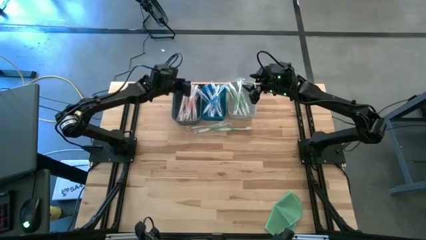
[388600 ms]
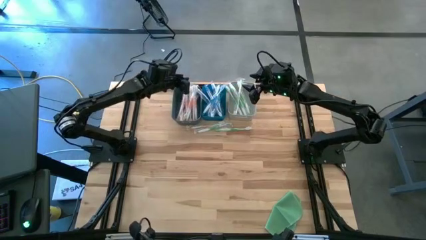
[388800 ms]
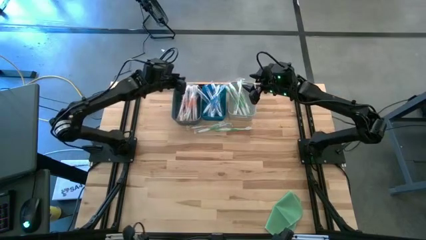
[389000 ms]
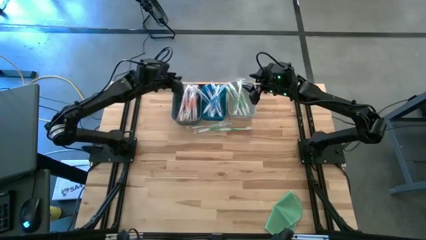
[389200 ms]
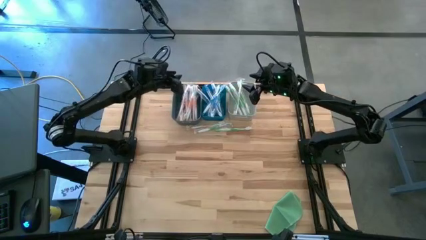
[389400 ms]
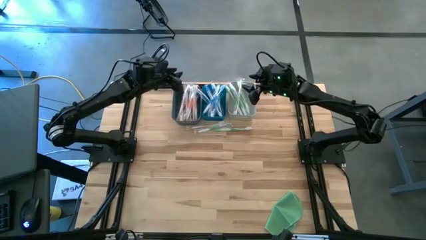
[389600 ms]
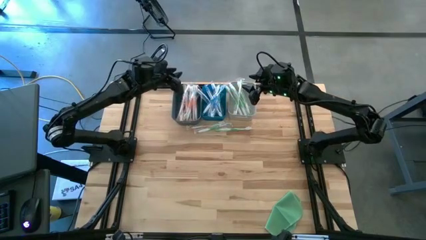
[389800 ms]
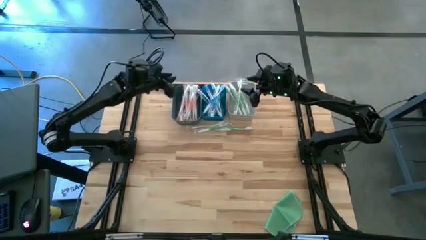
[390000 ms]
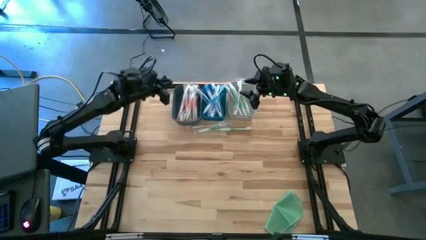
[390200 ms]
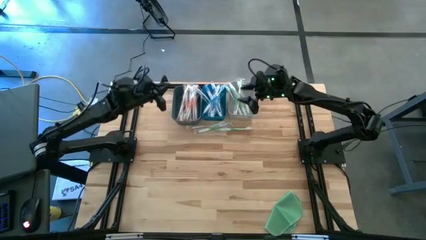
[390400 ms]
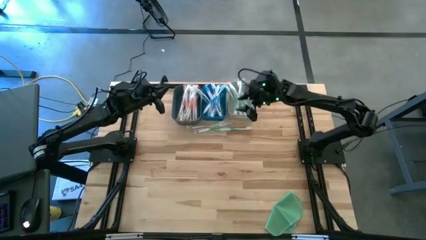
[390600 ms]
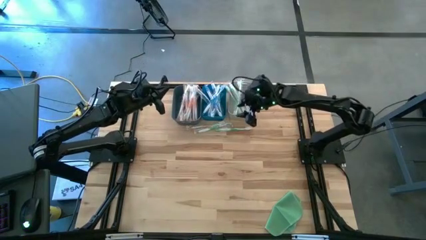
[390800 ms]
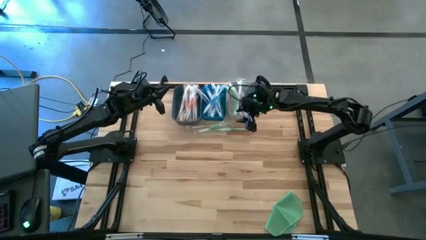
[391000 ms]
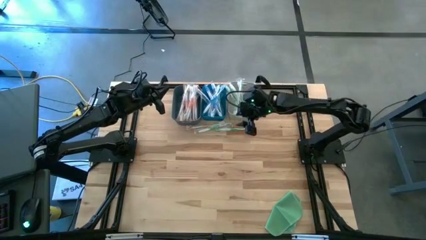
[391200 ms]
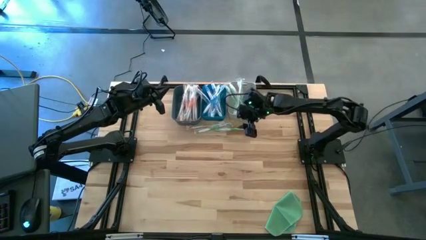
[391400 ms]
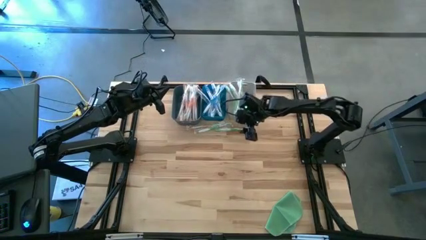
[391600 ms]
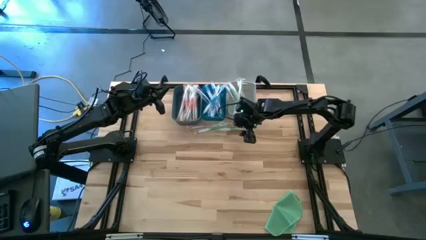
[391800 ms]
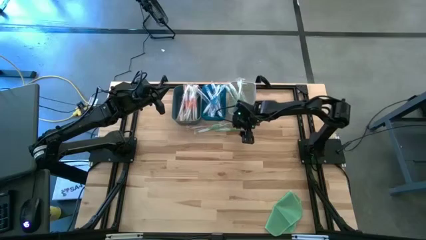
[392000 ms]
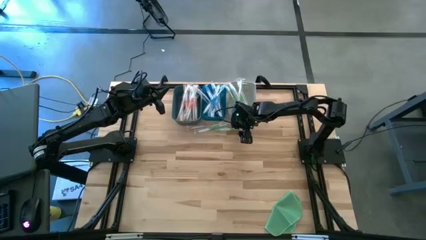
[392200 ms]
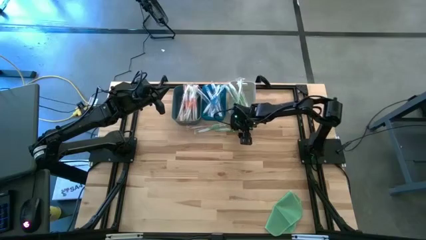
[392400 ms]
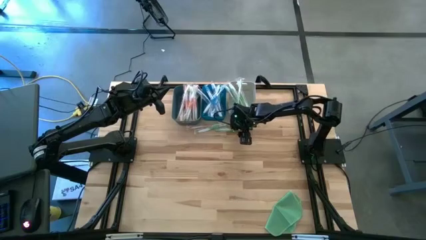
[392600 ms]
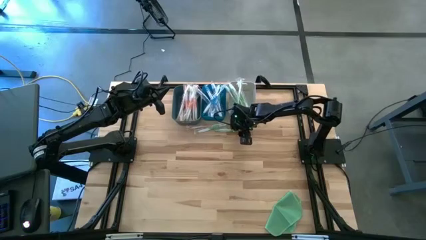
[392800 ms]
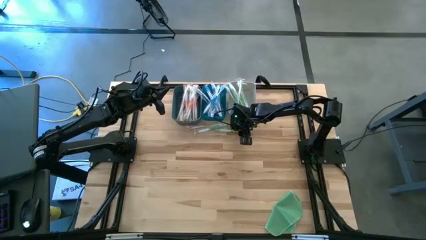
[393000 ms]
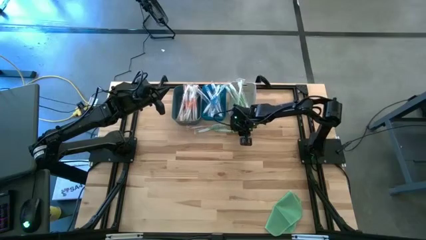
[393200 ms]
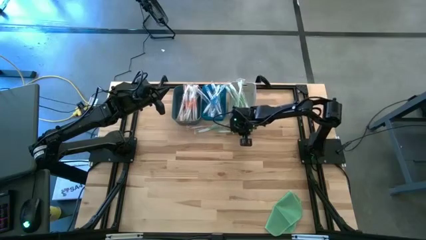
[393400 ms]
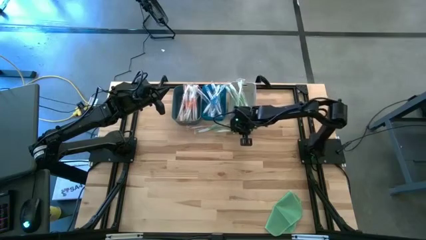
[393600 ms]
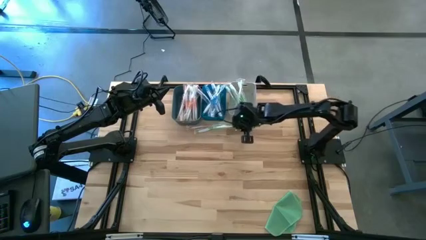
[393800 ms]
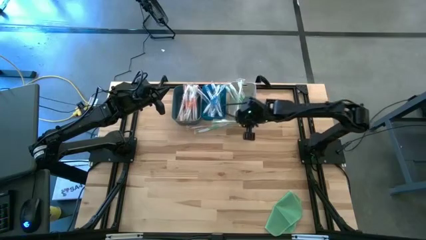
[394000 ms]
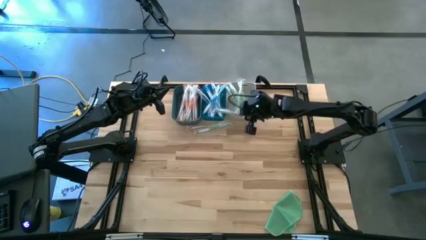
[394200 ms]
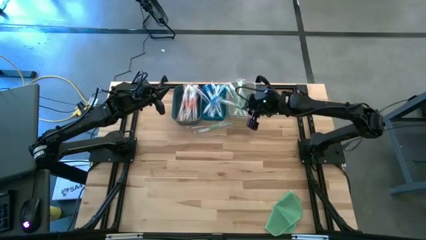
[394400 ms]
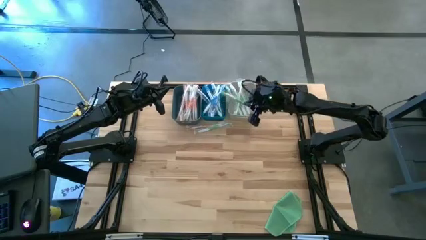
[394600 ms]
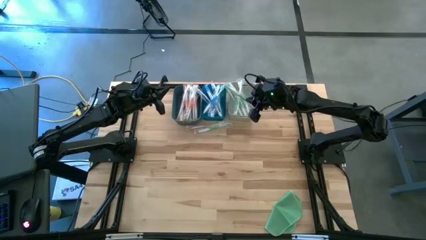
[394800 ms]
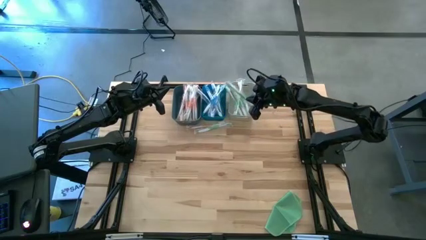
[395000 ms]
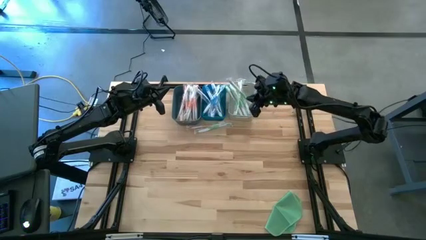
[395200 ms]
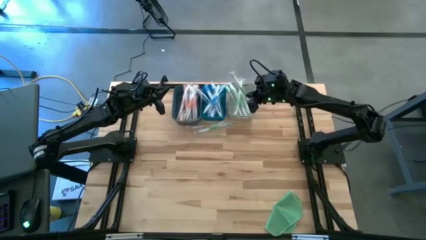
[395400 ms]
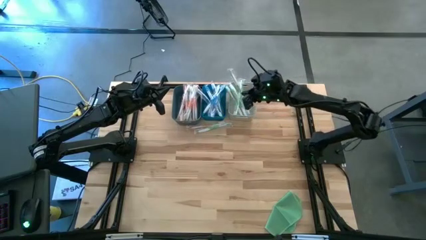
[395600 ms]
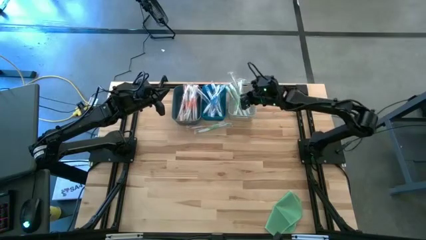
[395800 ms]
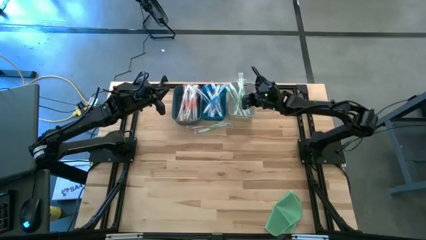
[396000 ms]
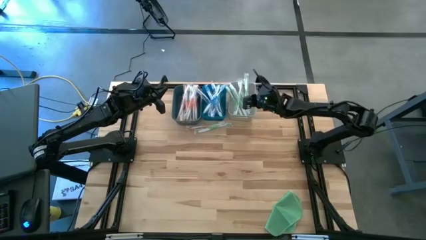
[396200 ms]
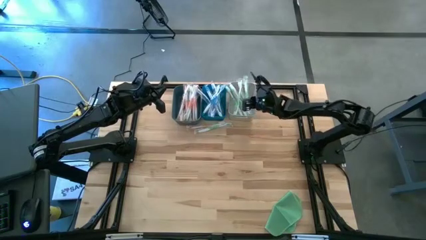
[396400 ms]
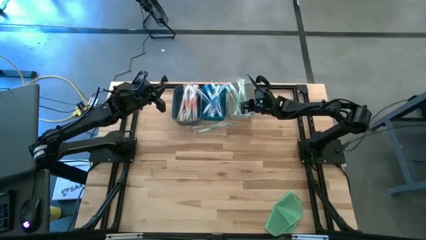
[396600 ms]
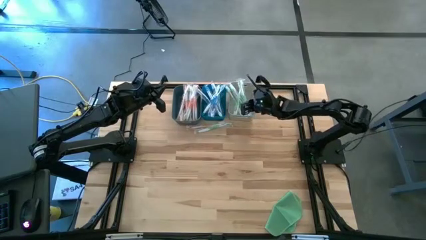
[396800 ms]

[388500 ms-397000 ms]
Task: Pick & Place Toothbrushes
Put the green toothbrush into the white bin

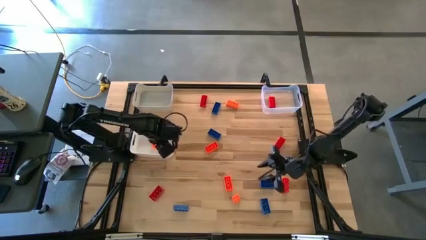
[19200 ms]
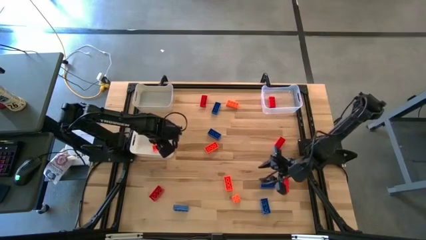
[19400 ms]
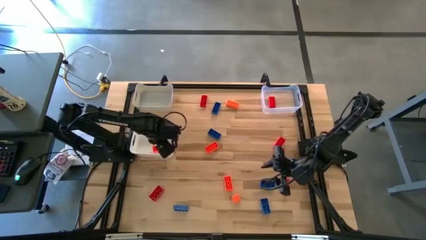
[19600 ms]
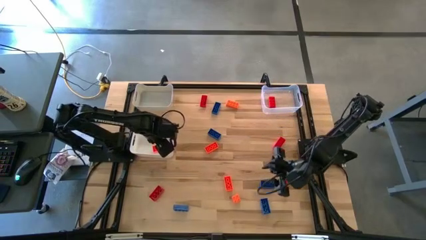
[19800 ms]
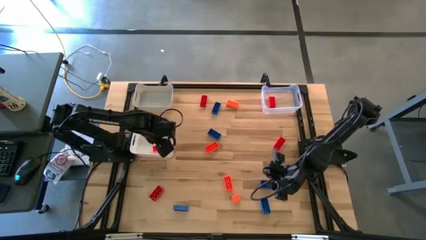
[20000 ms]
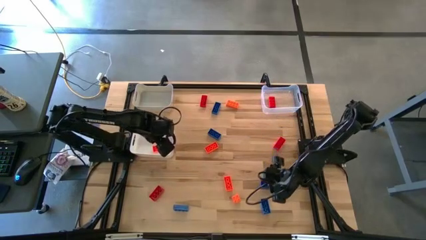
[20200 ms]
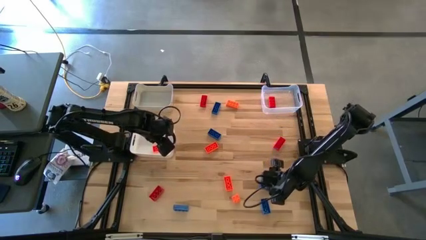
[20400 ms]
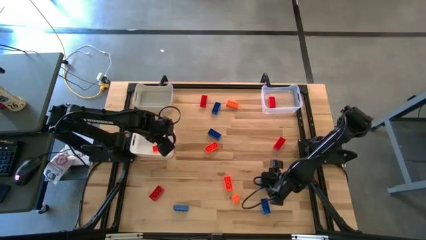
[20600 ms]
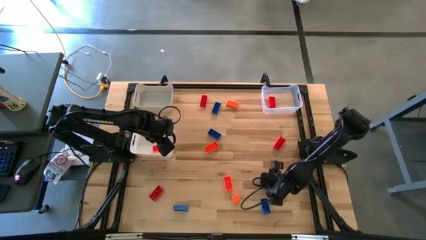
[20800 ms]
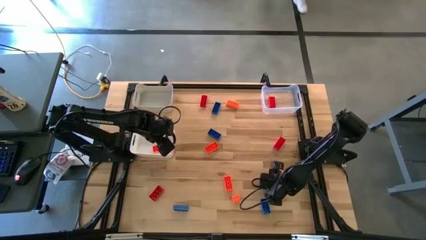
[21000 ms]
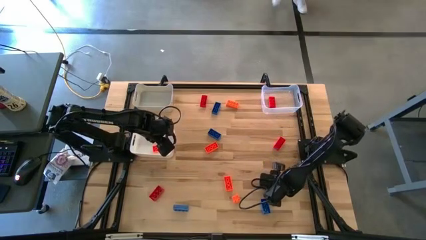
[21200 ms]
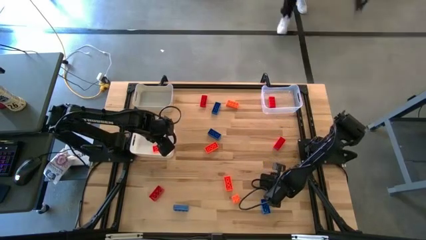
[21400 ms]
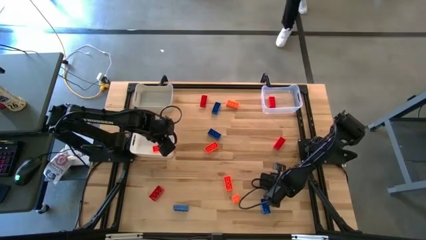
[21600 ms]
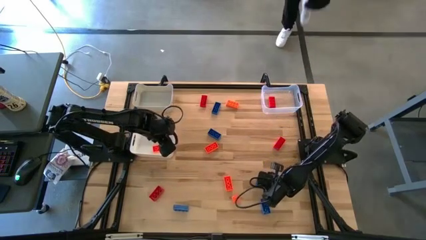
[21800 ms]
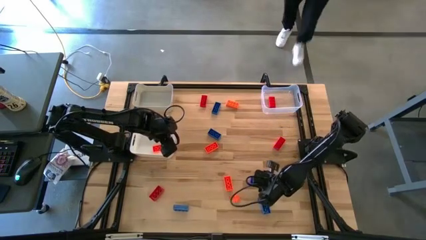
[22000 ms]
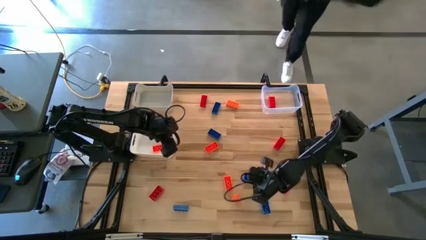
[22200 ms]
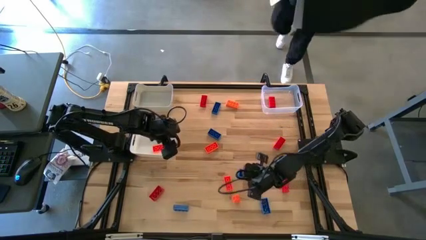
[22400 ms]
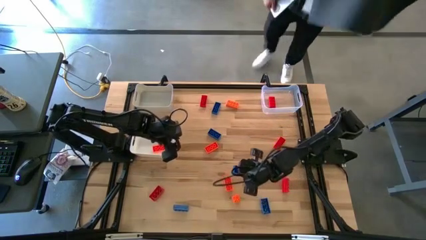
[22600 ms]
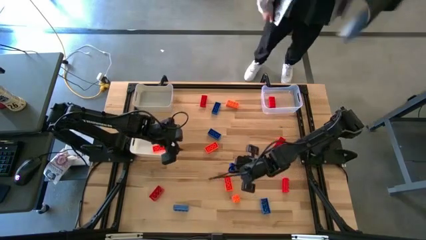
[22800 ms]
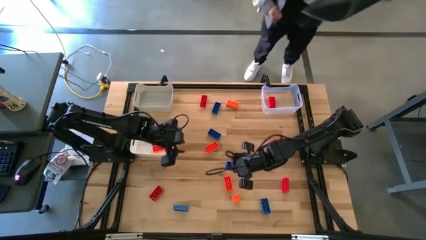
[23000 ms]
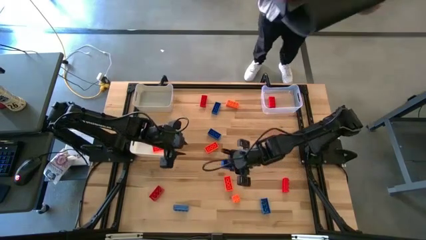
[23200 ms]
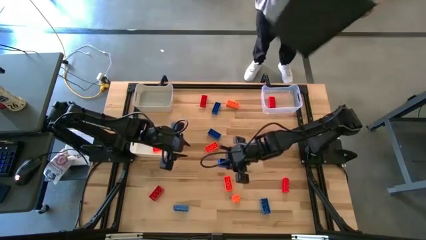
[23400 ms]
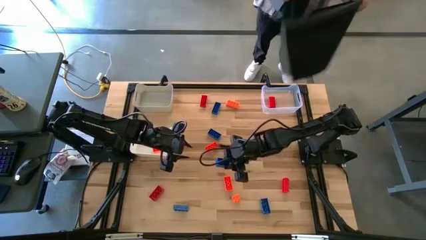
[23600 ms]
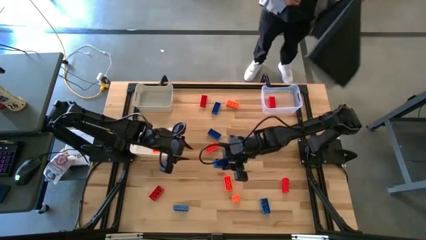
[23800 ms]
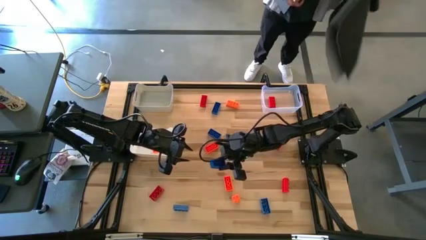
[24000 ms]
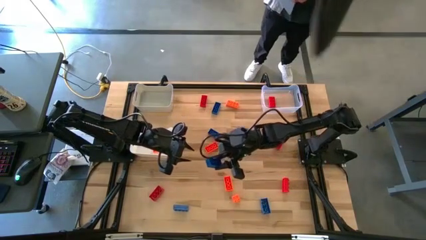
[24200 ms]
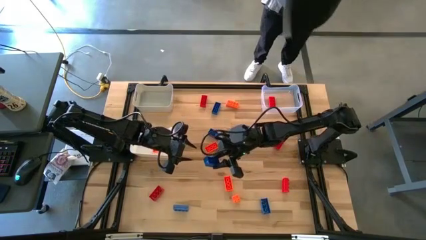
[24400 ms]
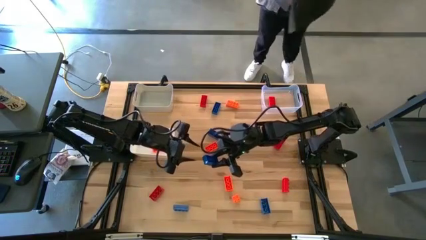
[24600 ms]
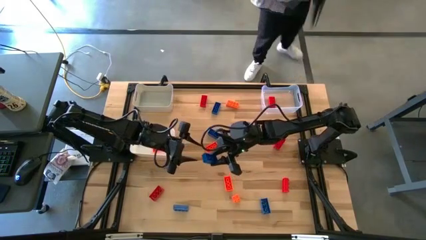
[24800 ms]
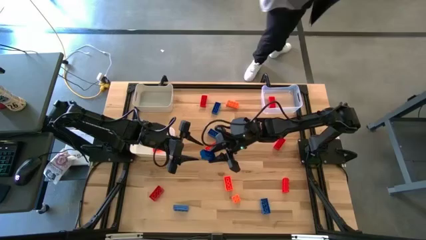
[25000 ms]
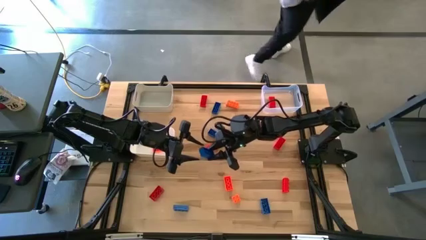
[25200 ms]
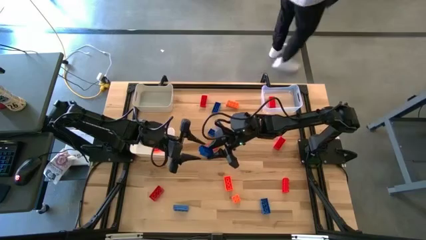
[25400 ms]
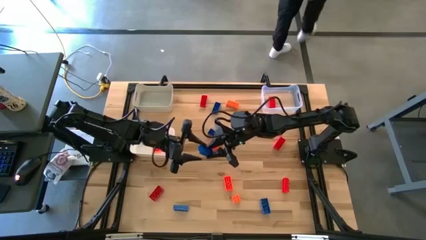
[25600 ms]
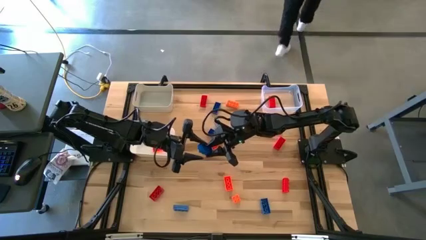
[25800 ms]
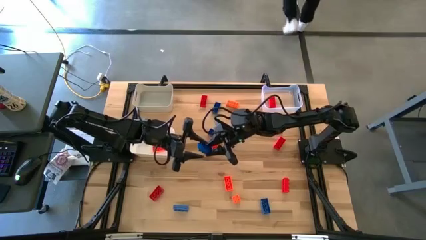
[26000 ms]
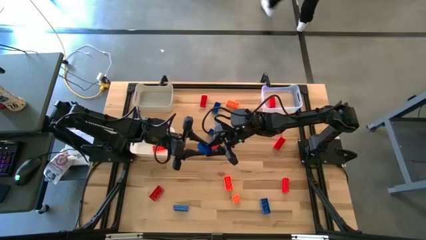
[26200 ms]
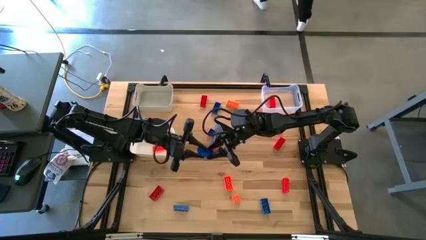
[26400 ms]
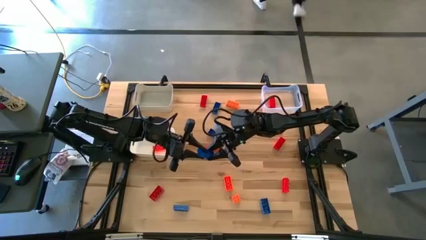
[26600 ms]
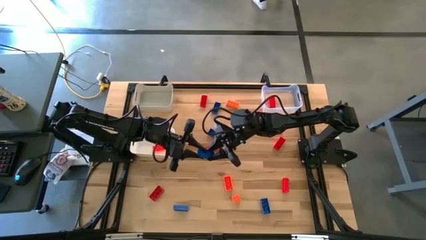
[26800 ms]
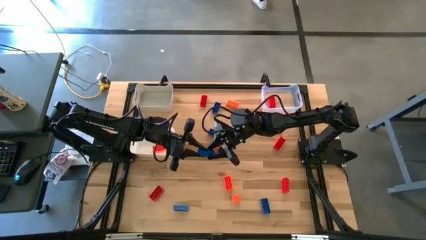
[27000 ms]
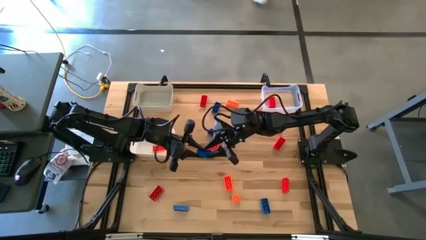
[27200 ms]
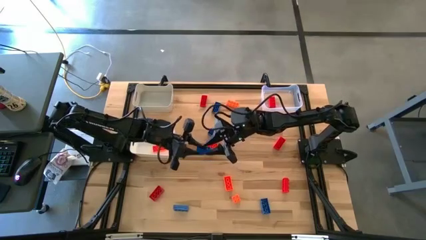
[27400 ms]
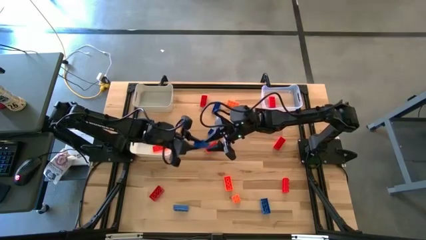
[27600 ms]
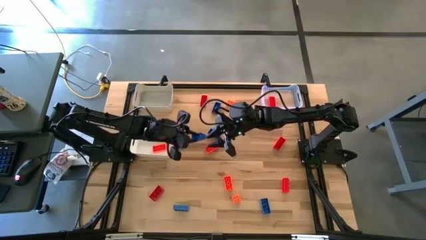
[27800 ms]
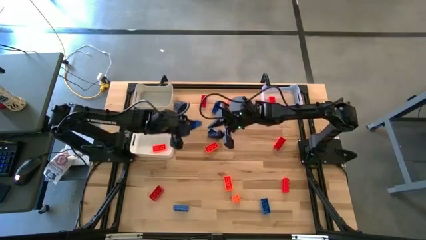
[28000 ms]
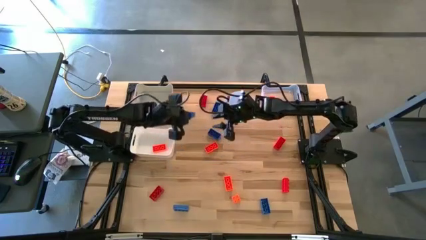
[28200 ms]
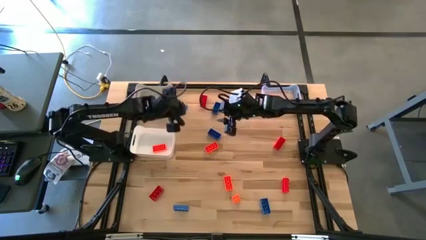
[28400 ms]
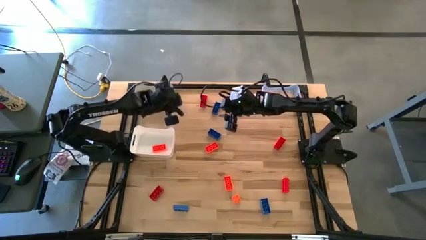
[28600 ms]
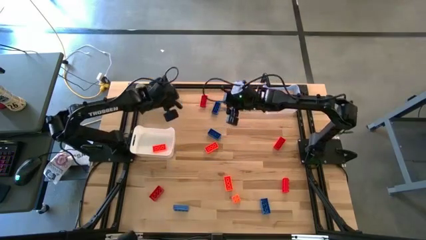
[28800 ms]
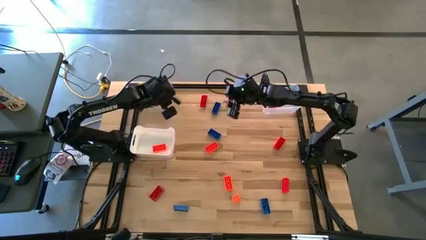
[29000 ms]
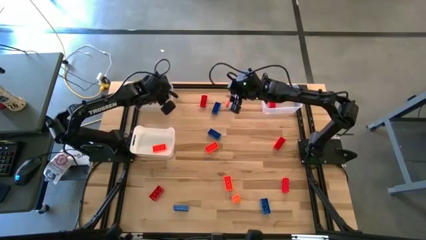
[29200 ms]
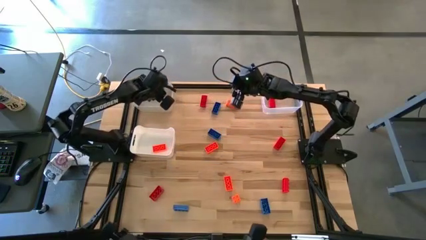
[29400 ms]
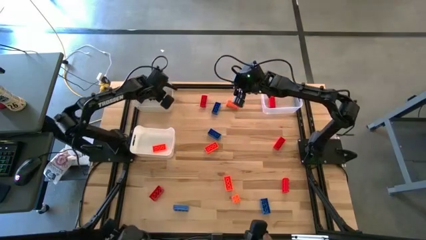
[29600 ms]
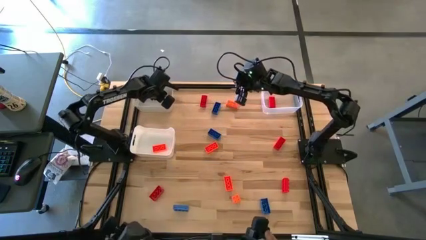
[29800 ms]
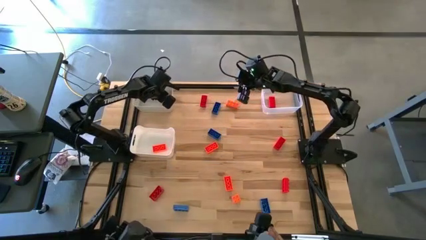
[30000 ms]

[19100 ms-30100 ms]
Task: Sort & place blocks by color
Put the blue game piece into the gray bin
